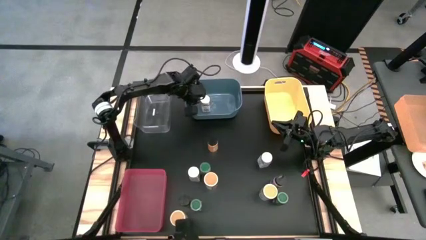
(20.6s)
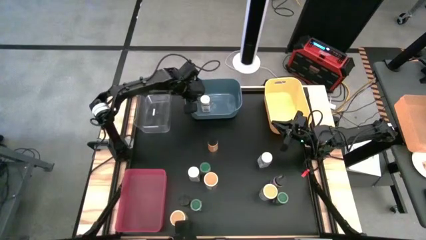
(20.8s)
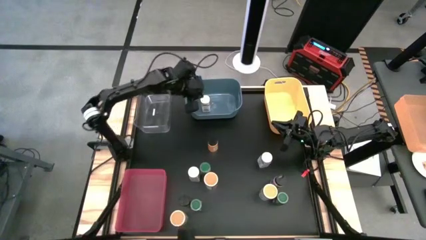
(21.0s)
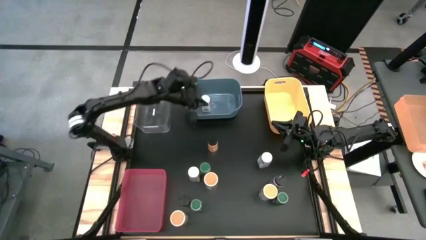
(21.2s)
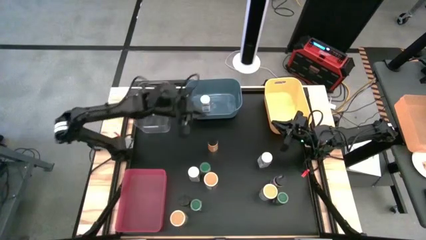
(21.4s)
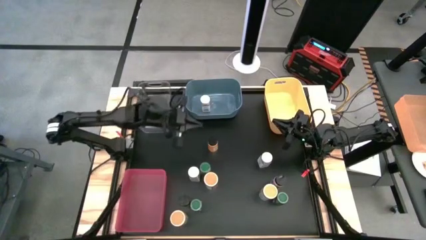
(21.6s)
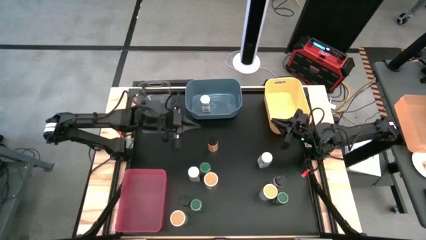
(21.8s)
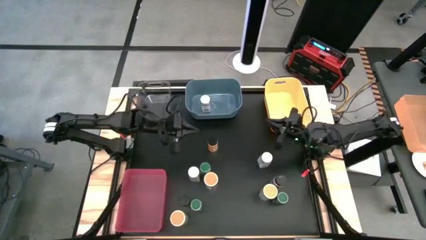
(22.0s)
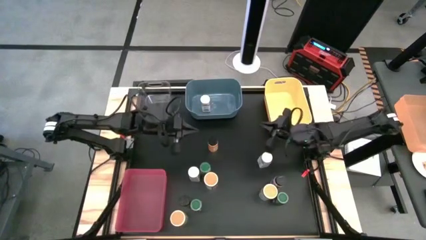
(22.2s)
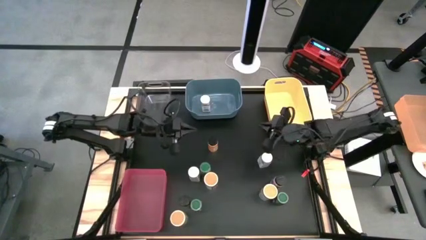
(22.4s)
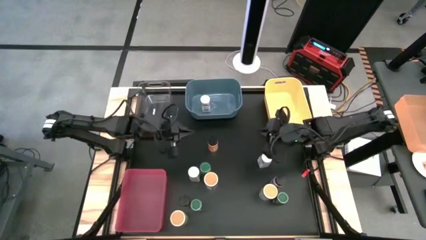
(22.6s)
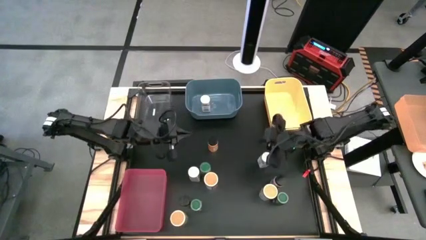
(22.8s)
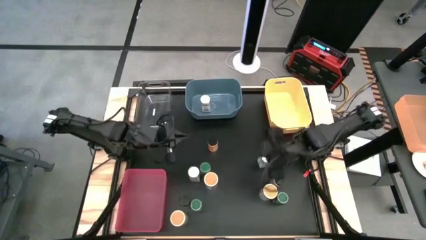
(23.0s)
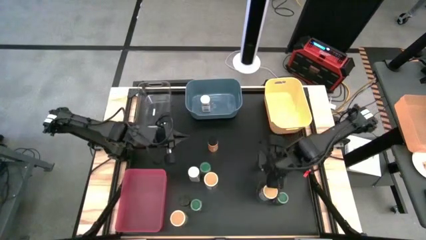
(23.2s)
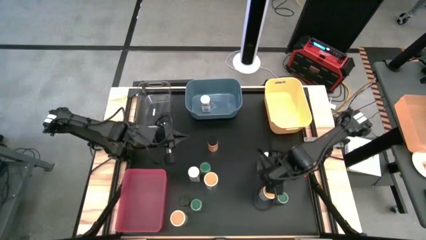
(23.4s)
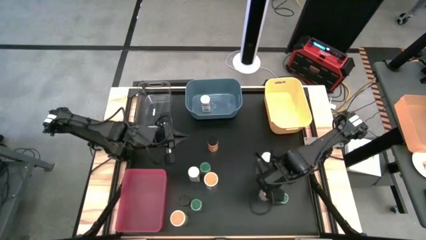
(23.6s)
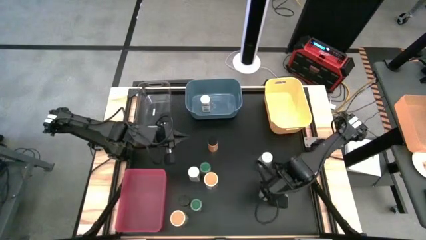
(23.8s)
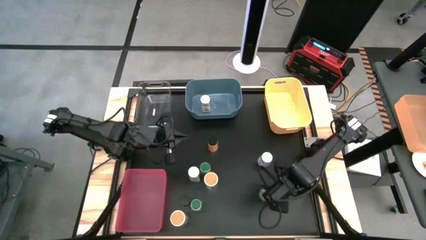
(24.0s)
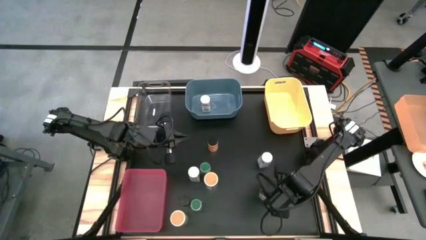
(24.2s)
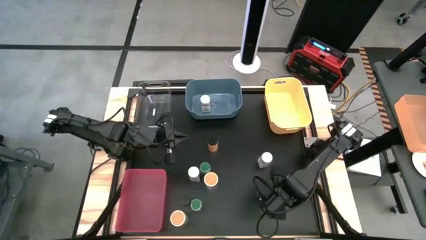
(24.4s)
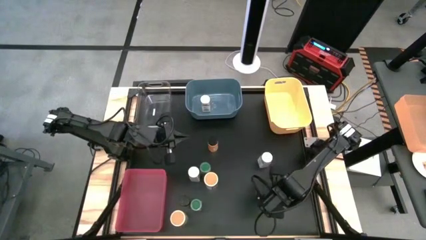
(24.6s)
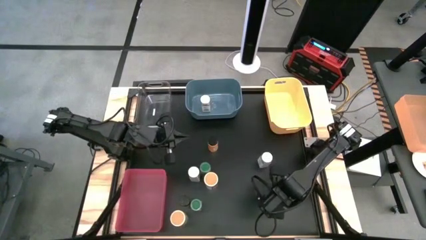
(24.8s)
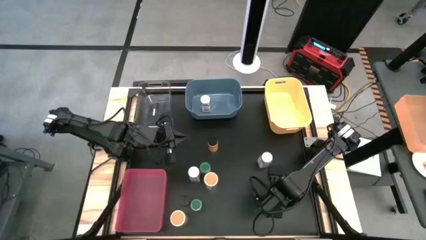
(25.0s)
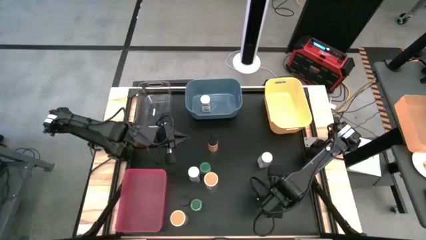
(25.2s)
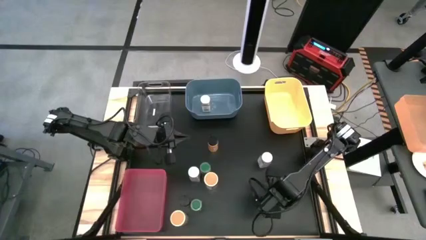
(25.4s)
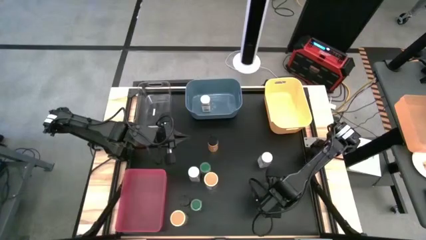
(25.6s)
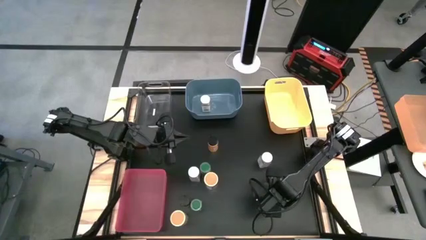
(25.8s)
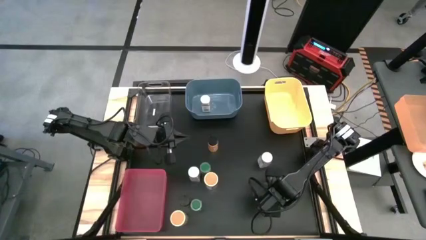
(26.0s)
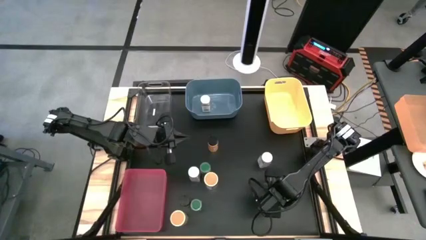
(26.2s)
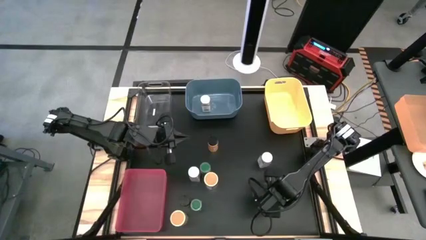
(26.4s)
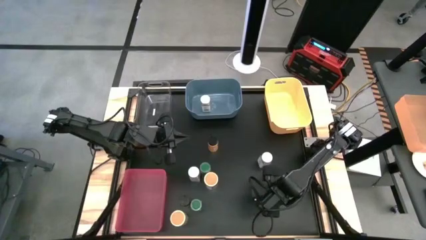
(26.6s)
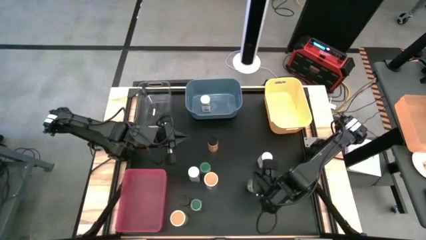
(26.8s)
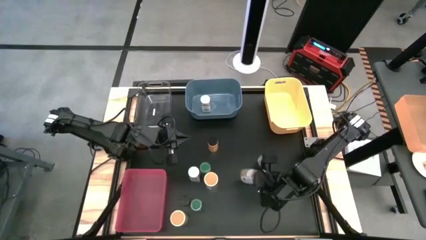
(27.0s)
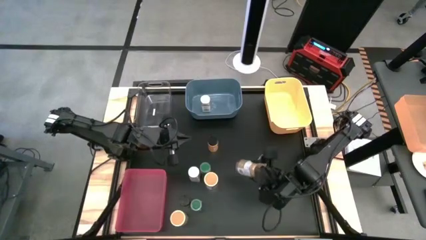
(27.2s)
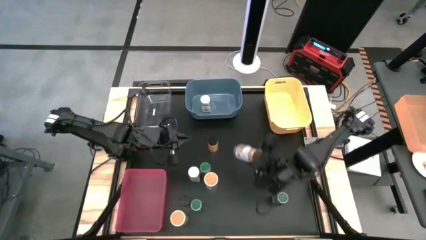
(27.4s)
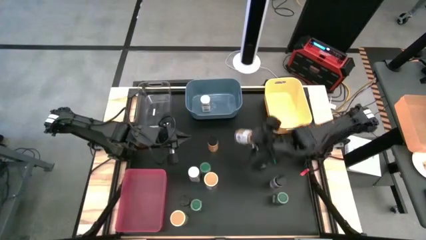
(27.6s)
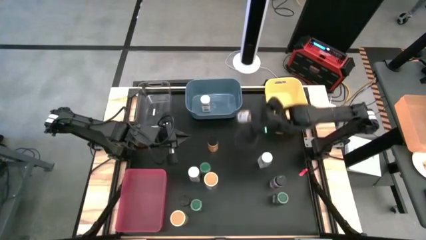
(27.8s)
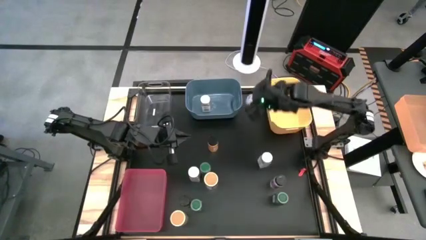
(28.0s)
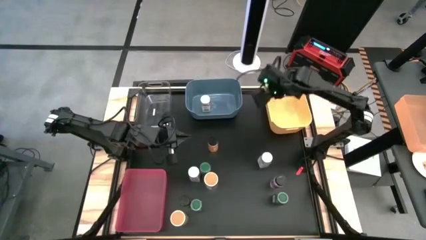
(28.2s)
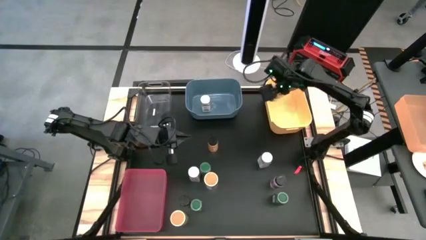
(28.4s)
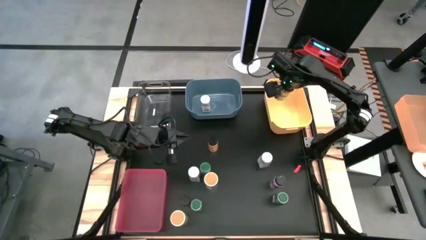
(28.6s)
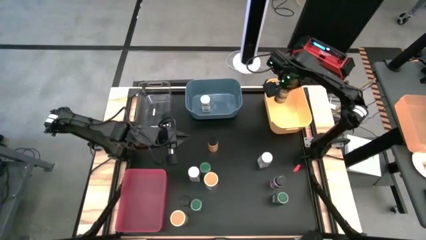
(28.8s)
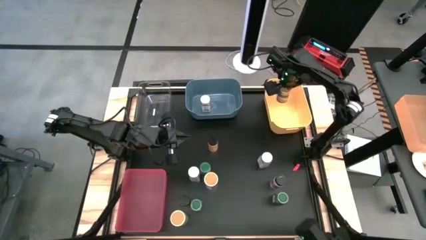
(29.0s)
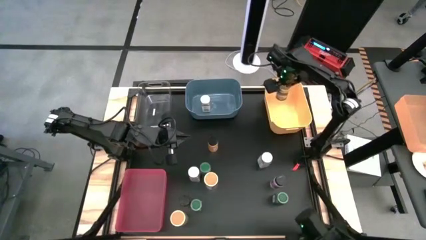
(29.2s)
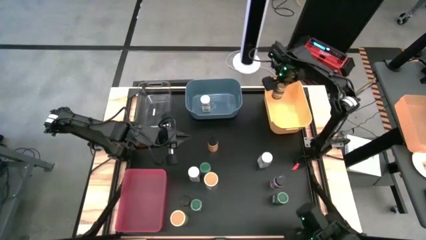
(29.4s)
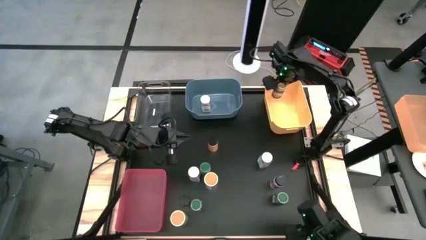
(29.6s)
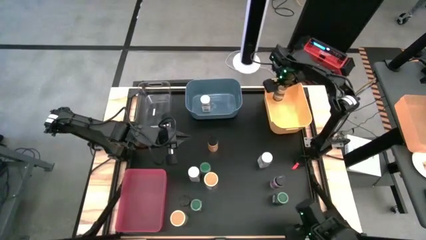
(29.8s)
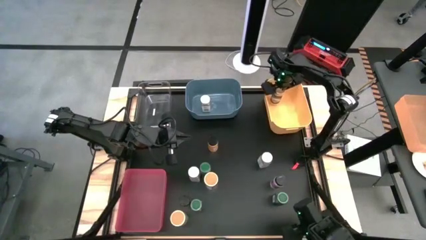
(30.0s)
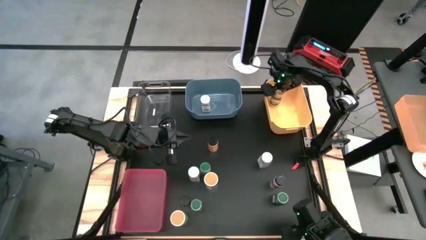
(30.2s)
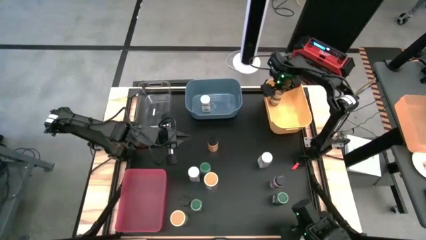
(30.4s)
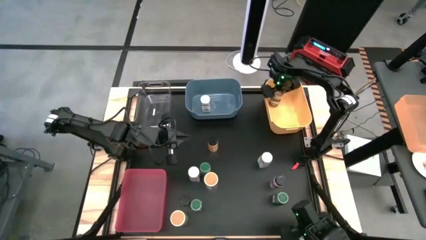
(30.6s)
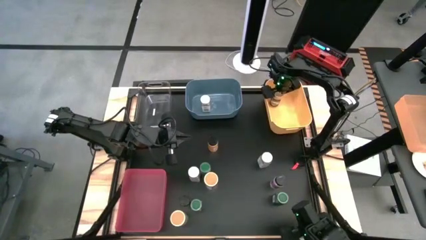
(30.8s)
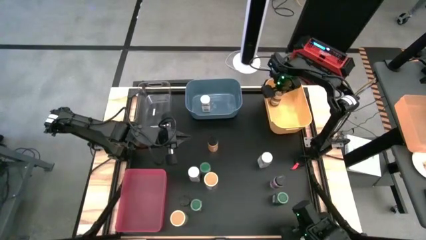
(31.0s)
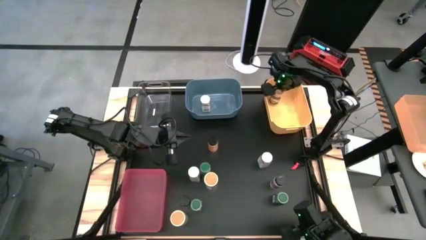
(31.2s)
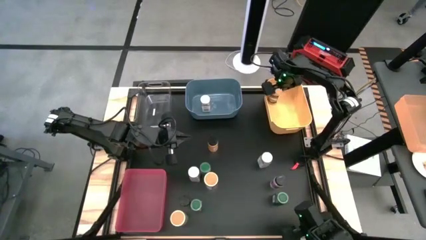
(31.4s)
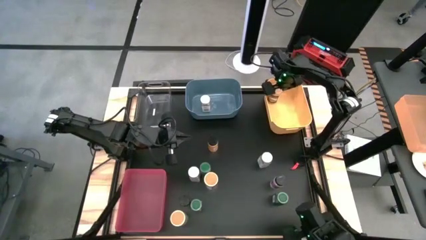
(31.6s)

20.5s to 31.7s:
Task: Sort spices by type
Put the top right gold seasoning bottle into the yellow bin

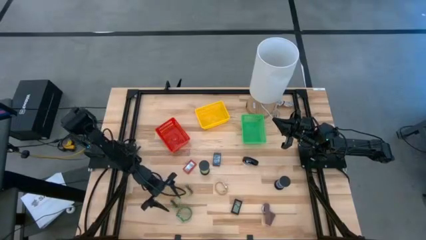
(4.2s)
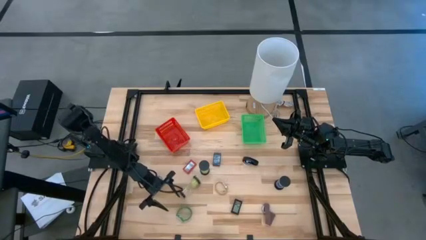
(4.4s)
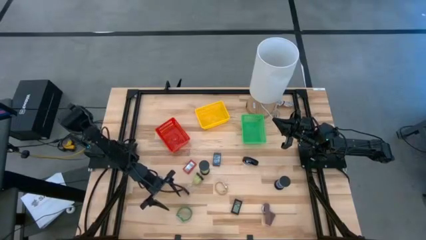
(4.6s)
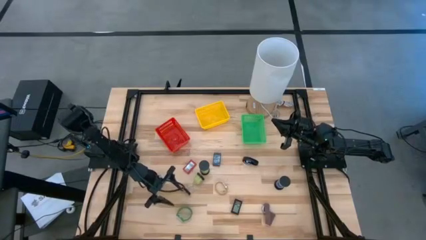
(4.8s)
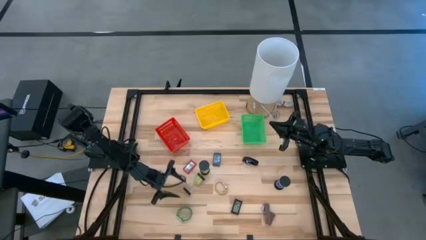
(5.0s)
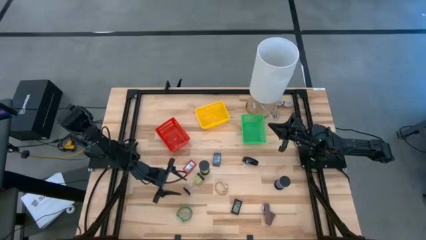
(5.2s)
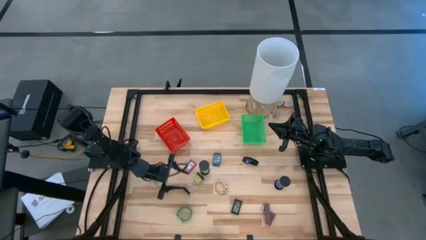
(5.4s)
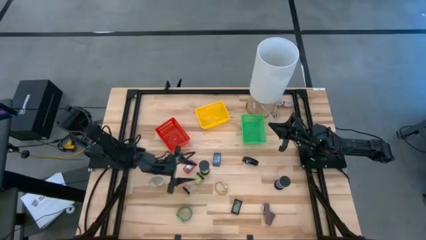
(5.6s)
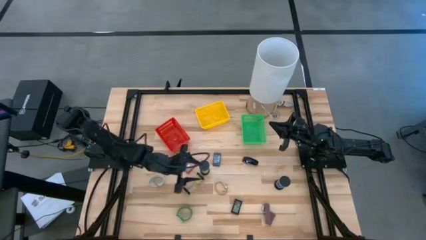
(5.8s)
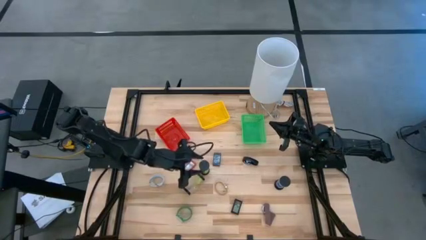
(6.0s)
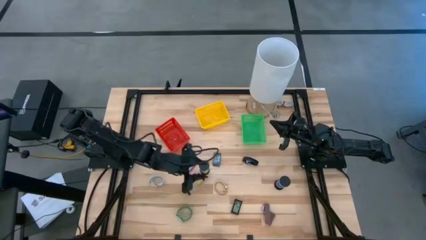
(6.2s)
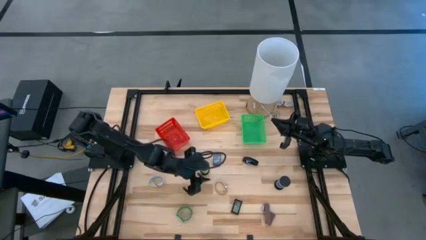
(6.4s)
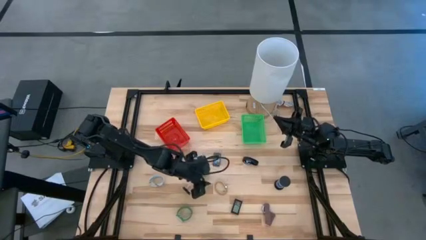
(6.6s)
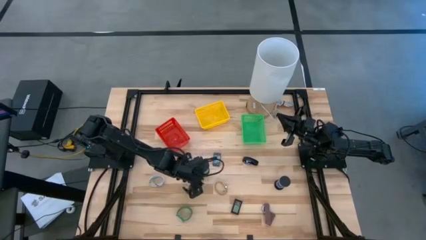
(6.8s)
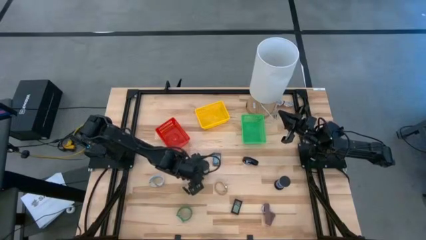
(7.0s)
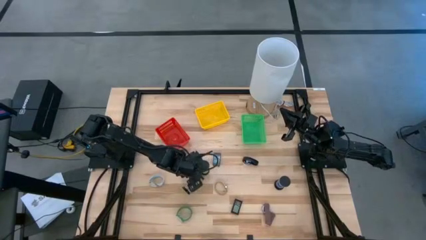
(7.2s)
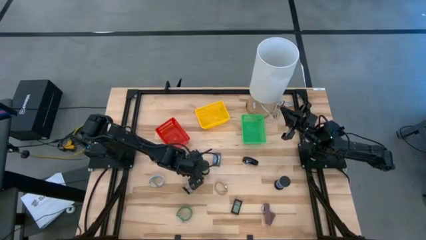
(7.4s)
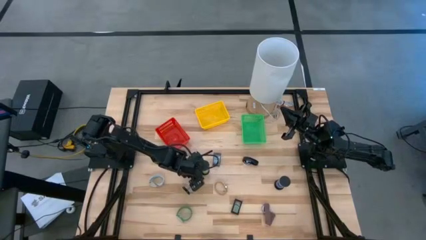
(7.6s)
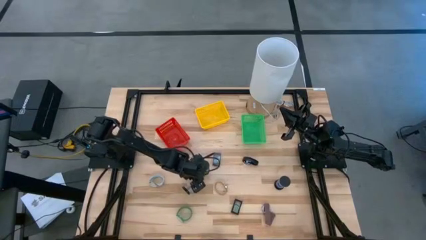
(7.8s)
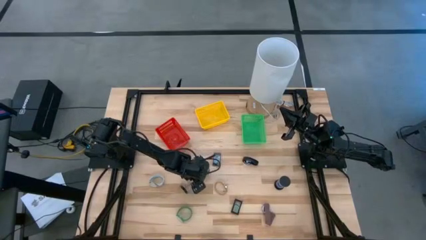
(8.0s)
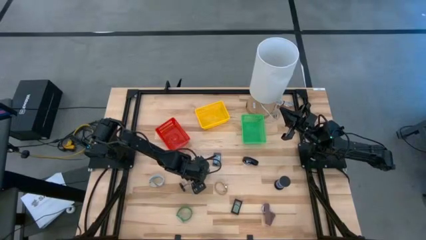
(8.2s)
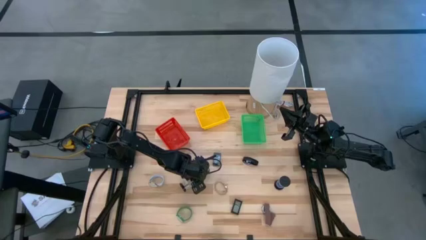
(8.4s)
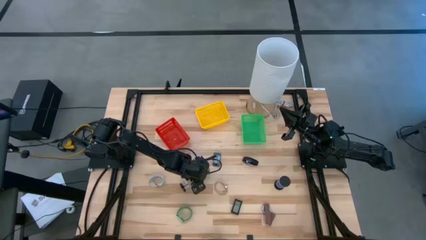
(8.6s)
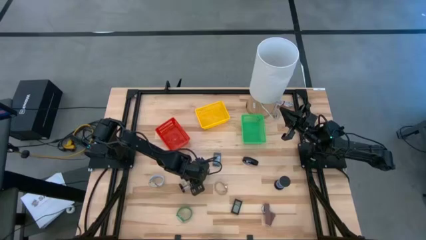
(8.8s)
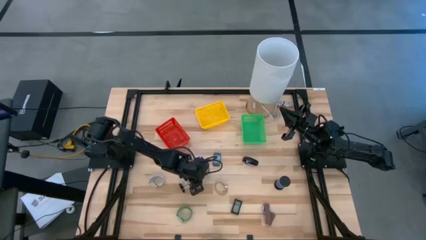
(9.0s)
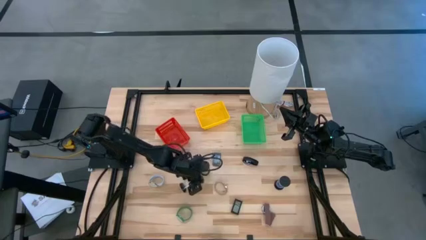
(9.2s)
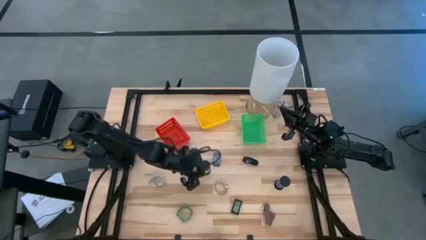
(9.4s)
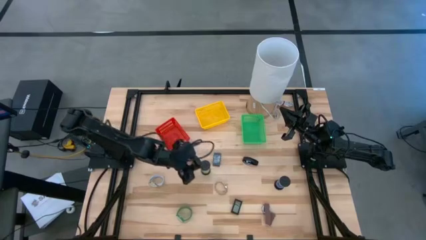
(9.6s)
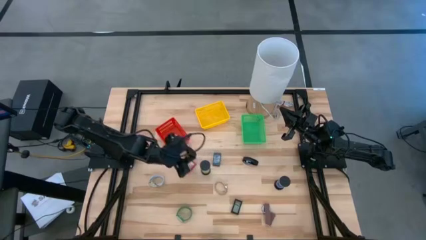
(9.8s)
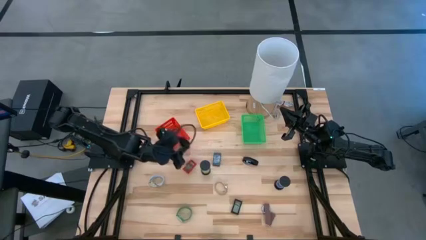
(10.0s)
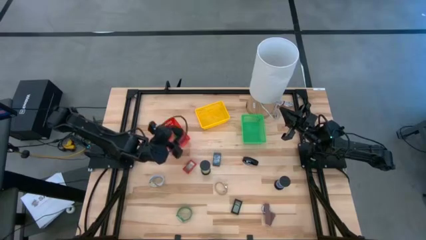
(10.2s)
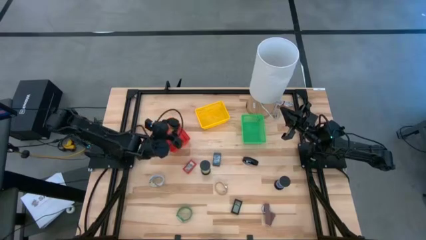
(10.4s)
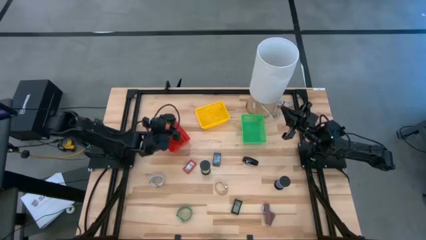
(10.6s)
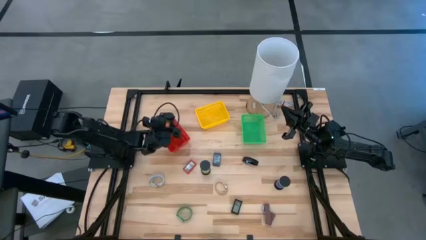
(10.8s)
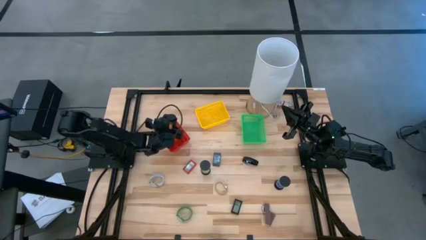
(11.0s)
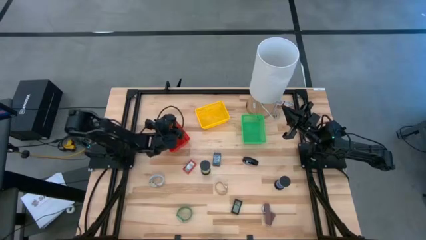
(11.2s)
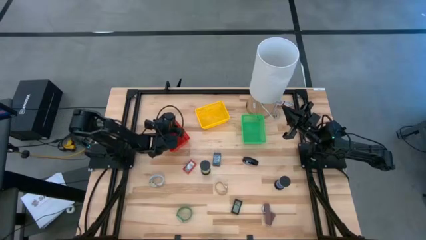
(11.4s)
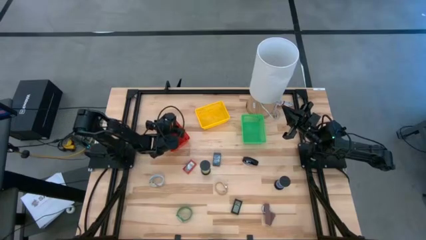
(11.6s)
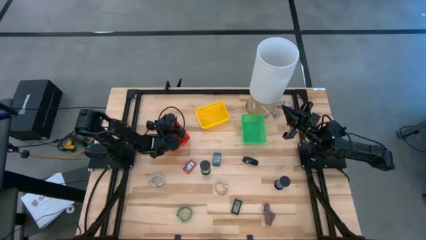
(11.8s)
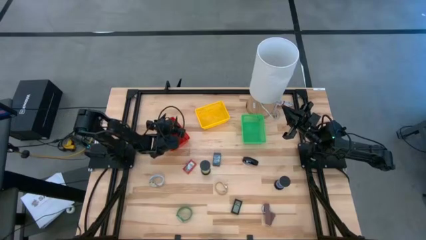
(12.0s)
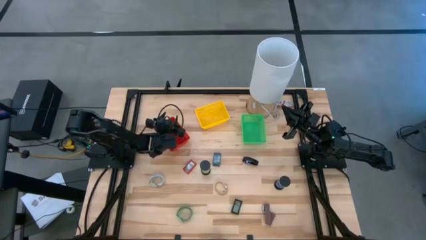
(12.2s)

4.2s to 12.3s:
Task: Pick & Place Office items
Put the left green hourglass into the red basket
